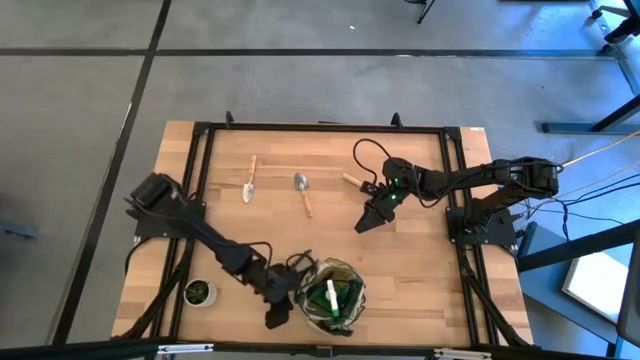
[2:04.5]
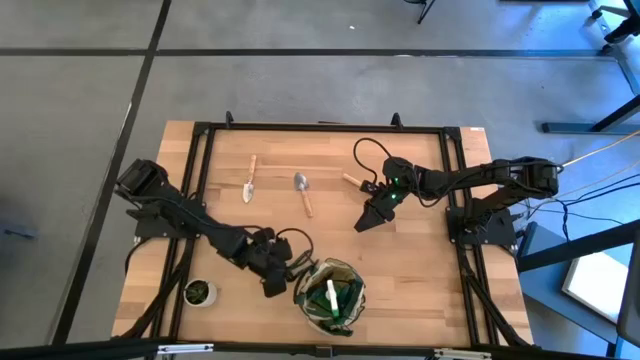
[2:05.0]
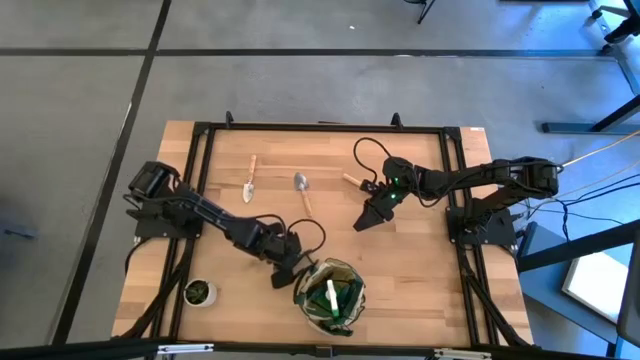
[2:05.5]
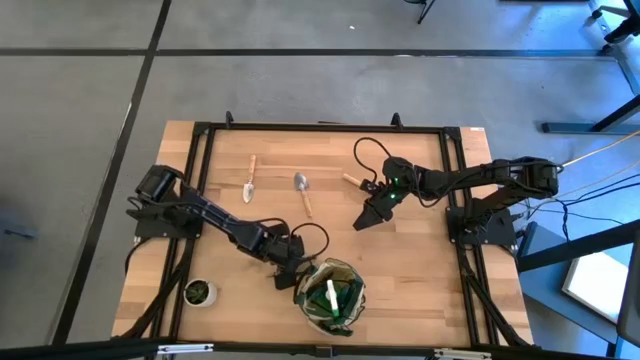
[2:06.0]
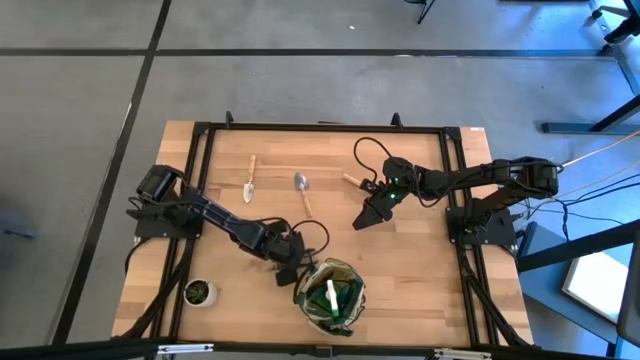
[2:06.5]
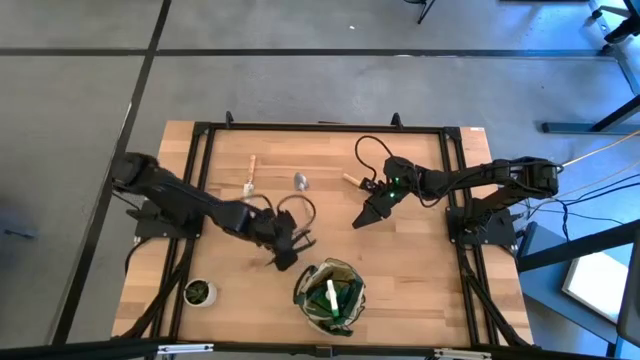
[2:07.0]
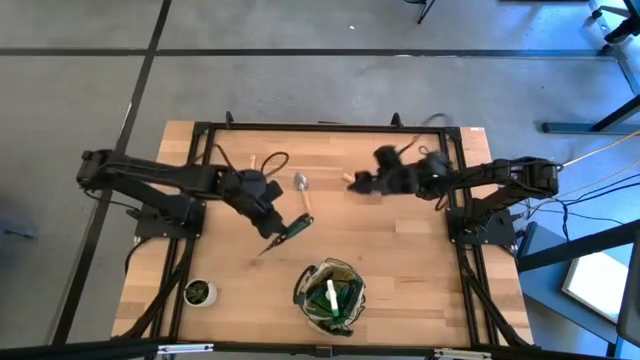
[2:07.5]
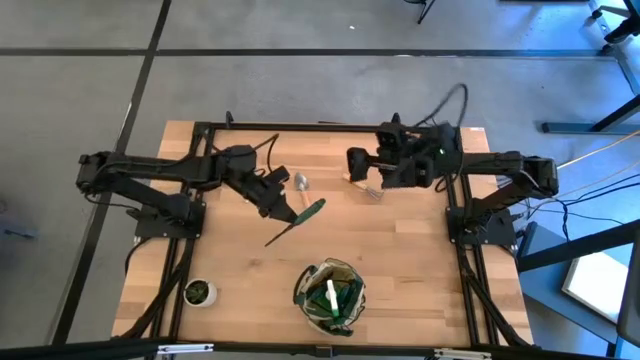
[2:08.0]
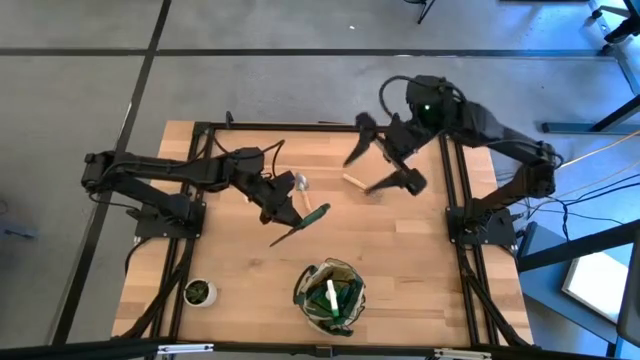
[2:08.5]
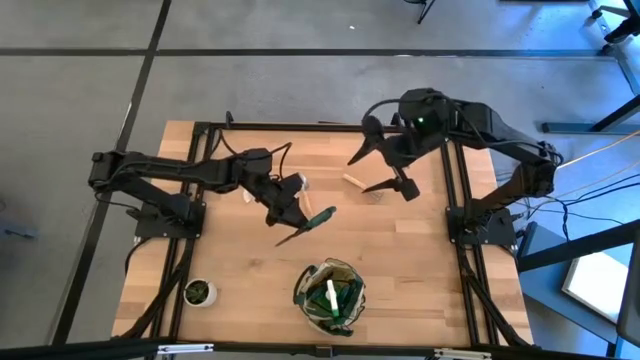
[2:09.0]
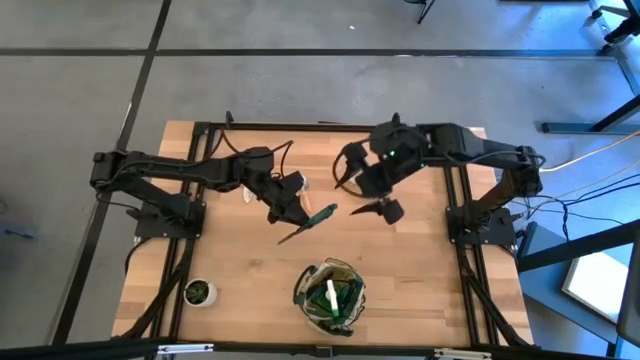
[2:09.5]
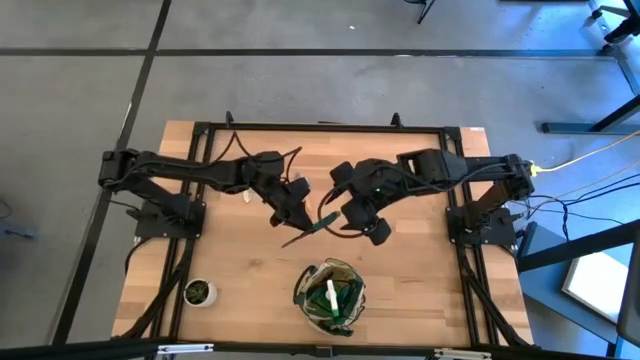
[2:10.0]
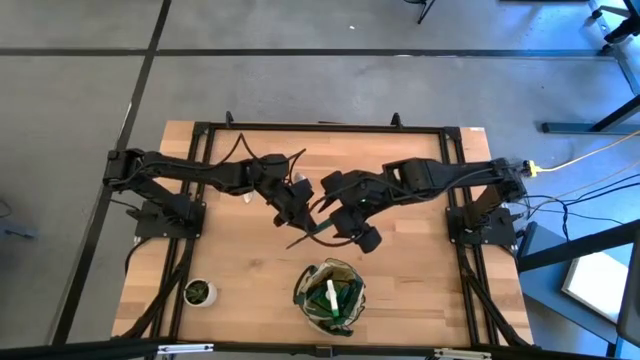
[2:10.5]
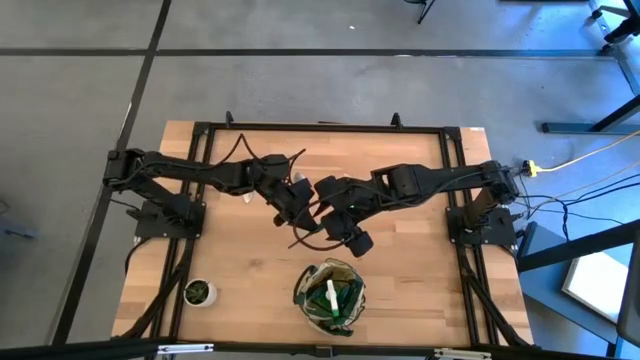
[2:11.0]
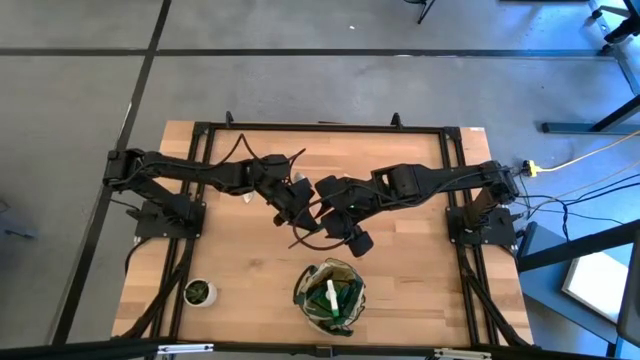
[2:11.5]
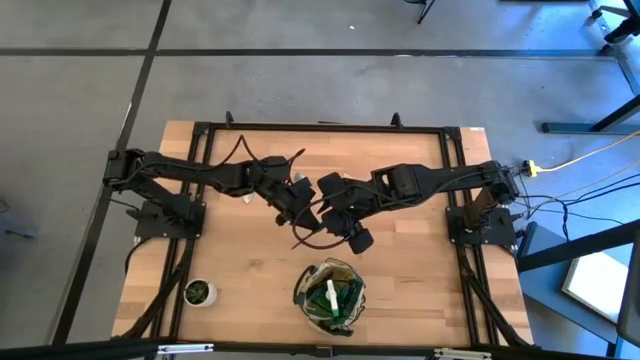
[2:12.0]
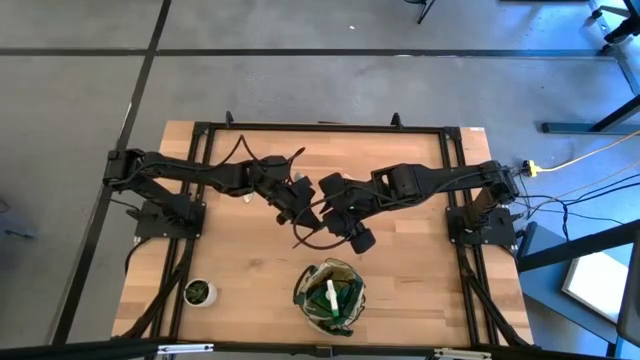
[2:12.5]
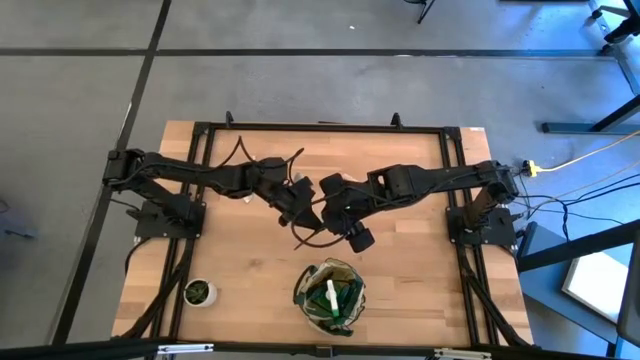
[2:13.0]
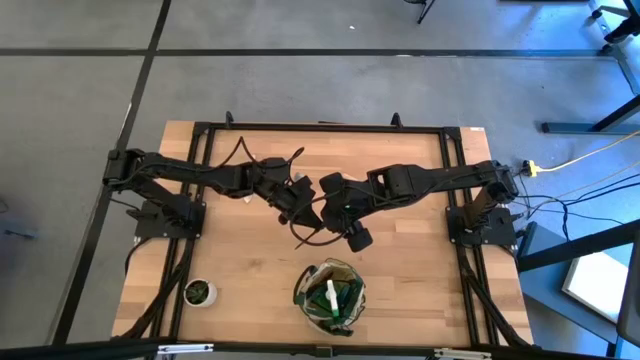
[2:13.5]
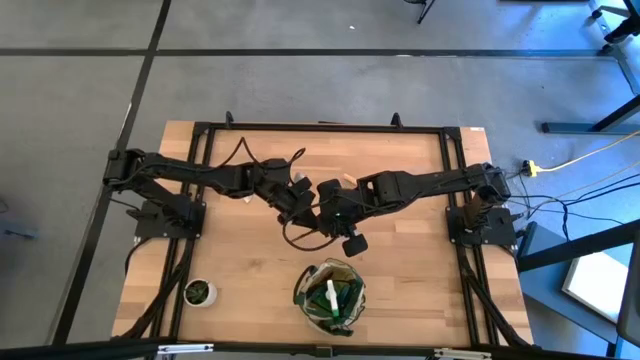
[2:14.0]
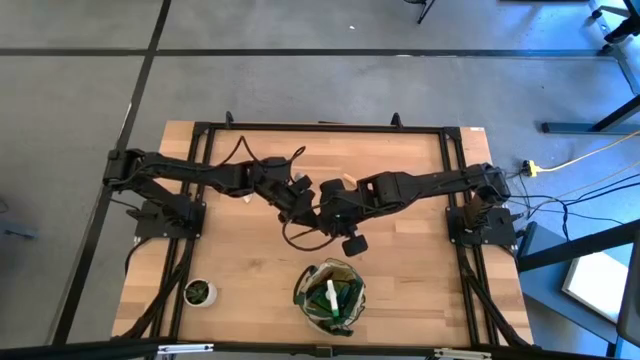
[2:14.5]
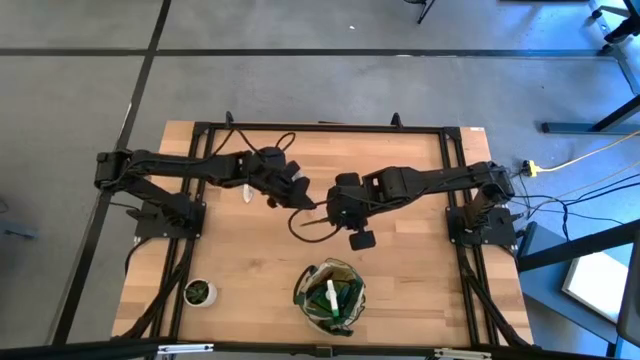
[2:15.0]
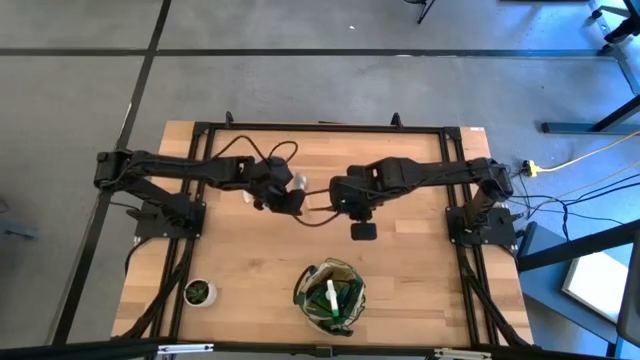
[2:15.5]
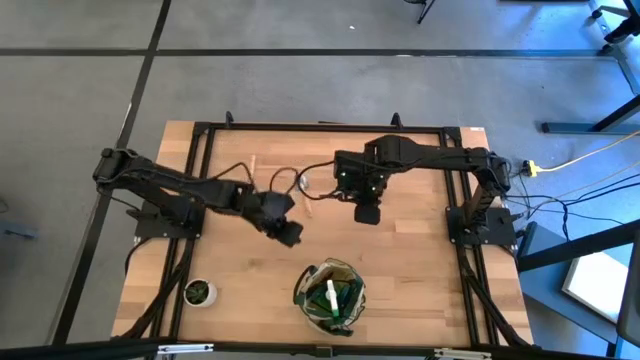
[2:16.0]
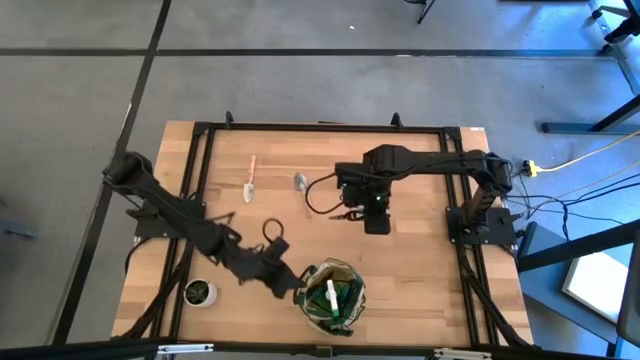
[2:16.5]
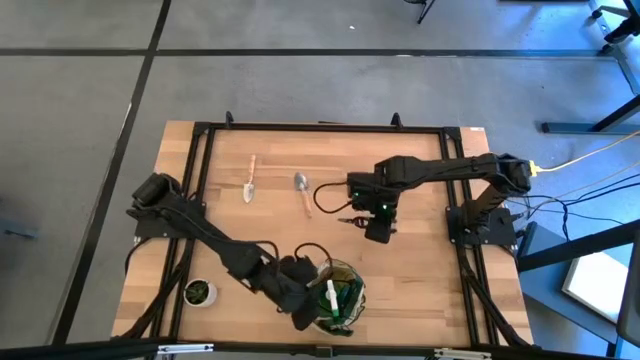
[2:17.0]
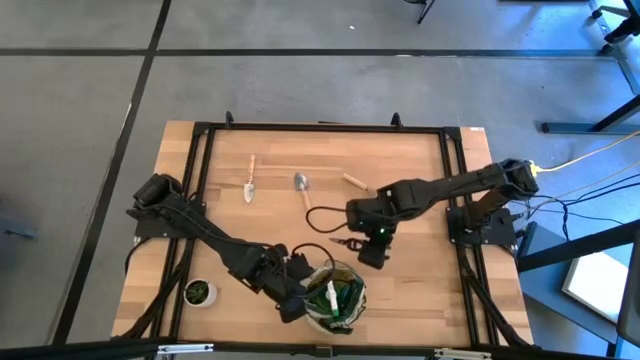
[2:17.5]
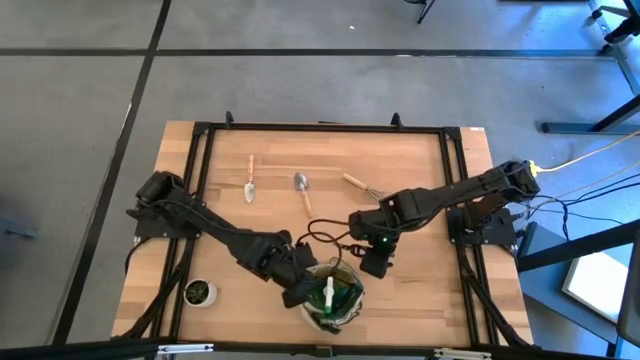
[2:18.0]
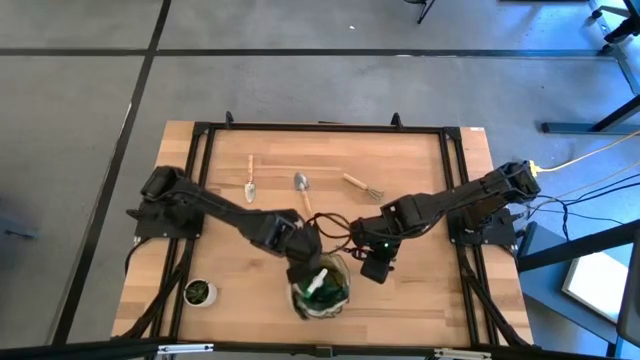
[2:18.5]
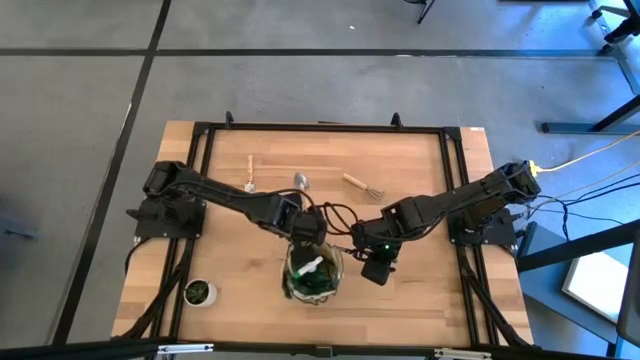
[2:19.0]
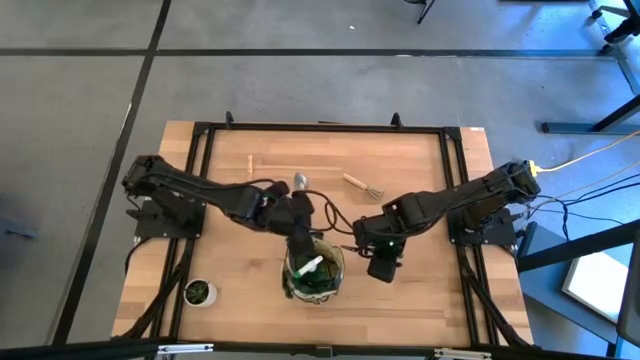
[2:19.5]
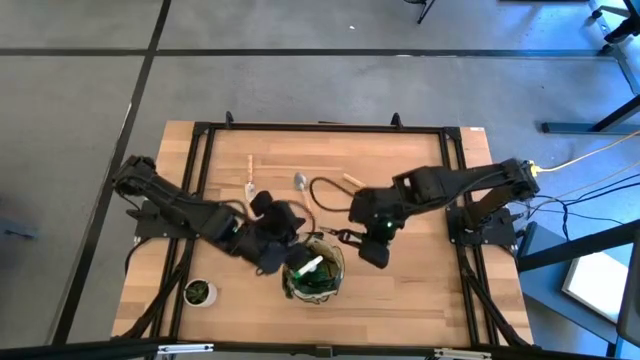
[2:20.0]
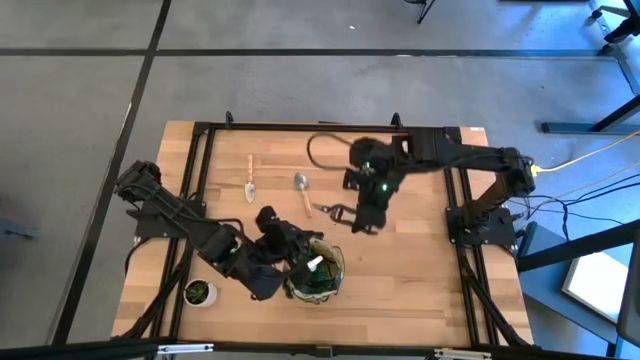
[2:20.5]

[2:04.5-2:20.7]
Task: Pick & Place Garden tools in Gardening bag
Put the green fruit pruner into the gardening bag
